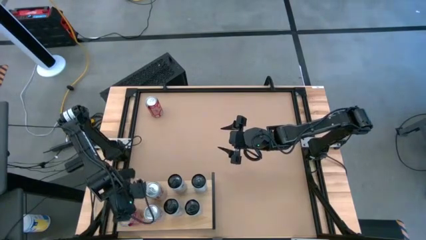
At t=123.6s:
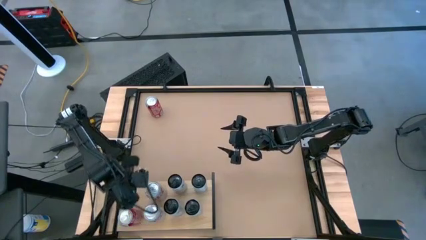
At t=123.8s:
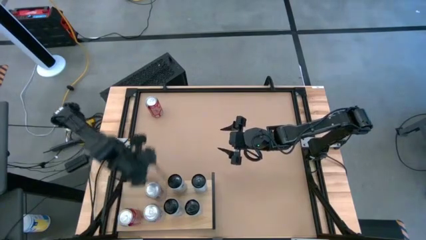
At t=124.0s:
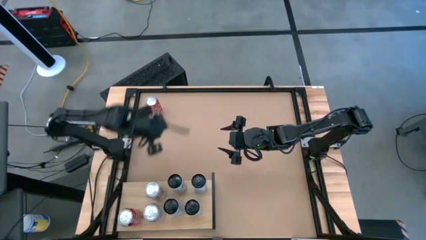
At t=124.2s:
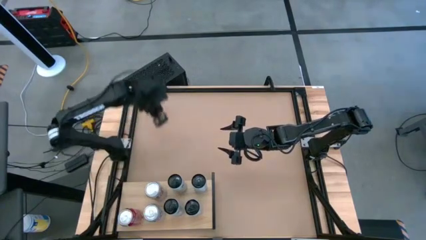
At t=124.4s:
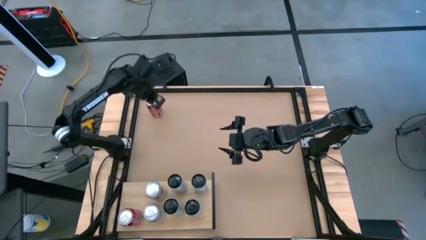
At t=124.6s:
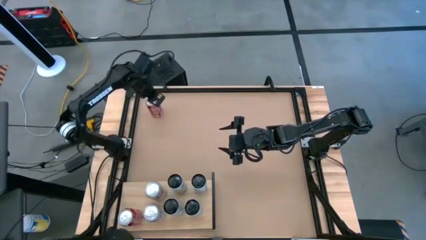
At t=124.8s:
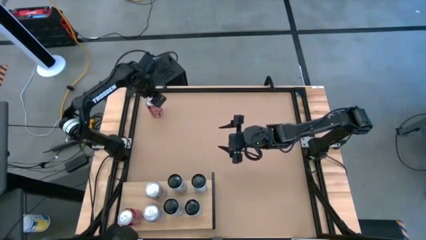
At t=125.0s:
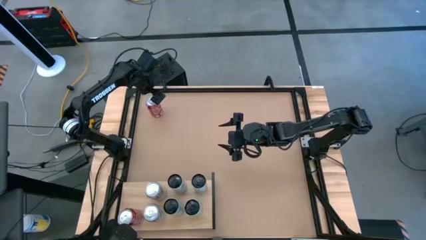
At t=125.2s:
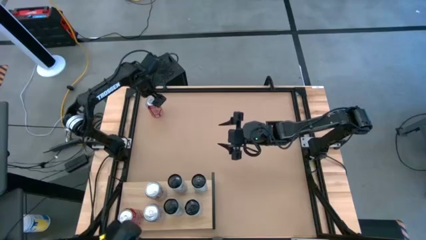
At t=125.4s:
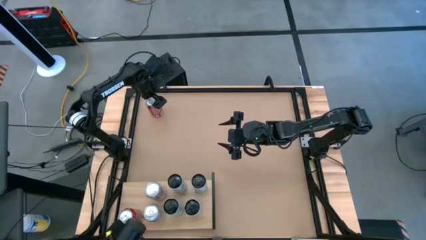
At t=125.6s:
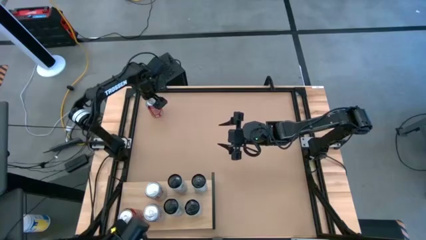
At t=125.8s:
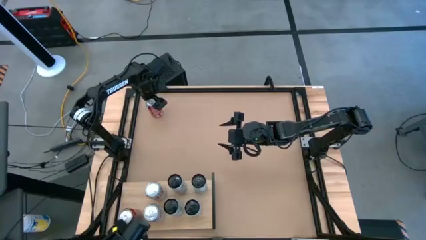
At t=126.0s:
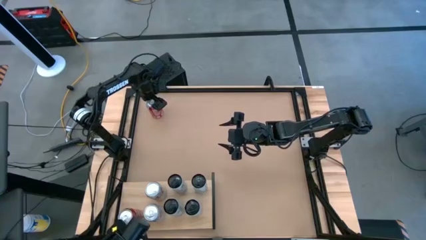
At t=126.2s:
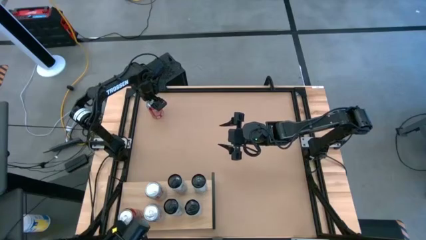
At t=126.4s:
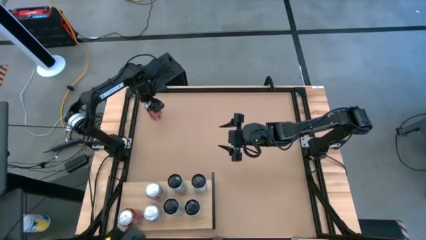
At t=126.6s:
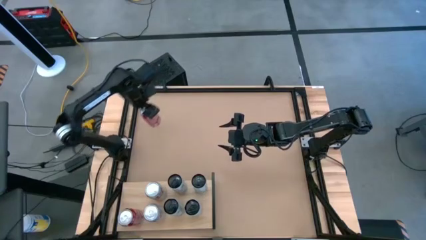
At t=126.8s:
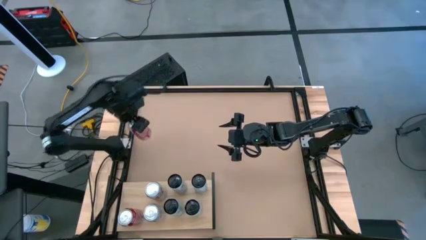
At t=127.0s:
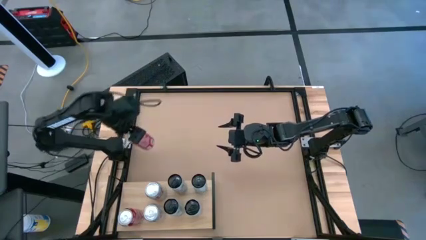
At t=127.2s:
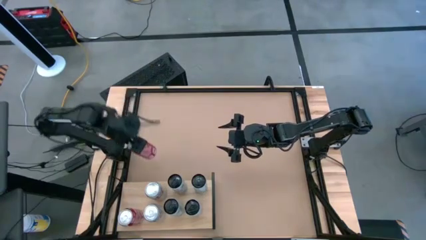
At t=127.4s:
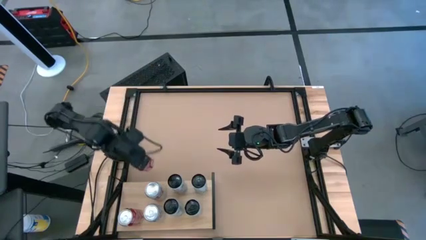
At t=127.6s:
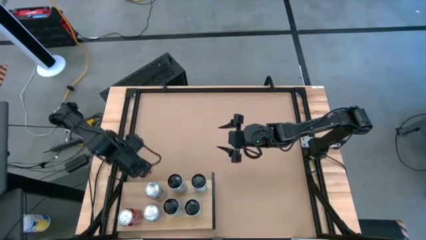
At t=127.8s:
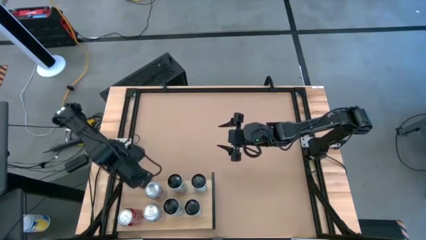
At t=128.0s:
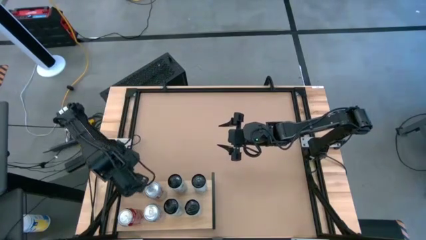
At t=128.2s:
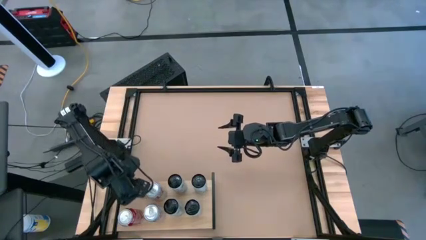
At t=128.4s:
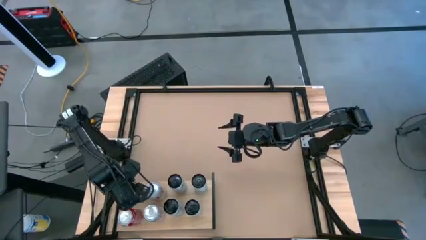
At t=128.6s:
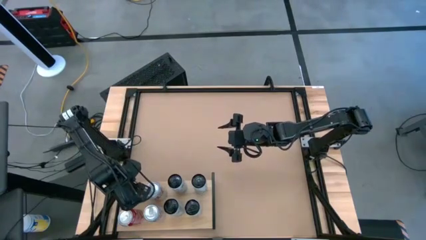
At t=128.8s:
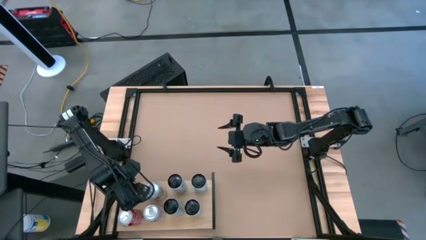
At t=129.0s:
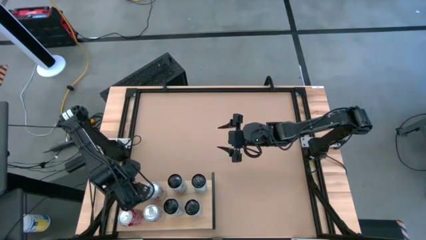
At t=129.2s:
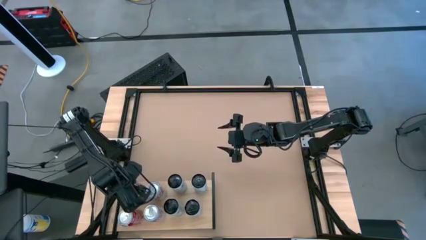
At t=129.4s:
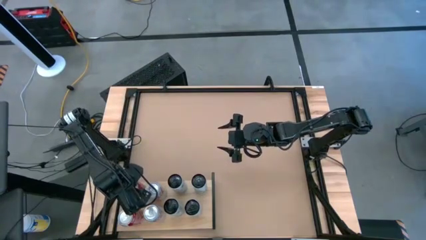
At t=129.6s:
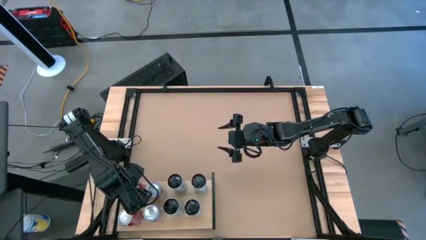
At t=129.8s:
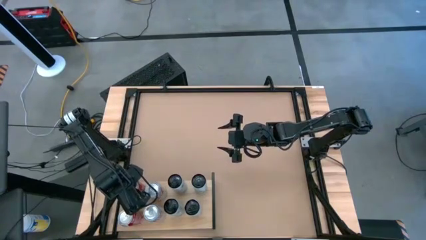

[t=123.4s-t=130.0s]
Task: Place canned beverage on shelf
Put the white can on the shelf aligned with the other red soda can

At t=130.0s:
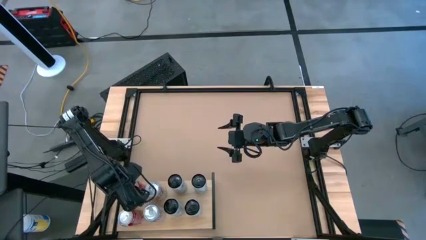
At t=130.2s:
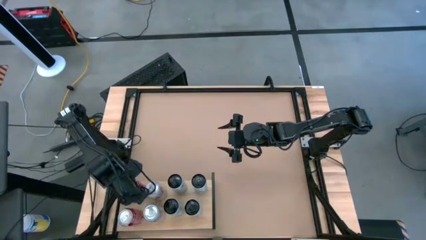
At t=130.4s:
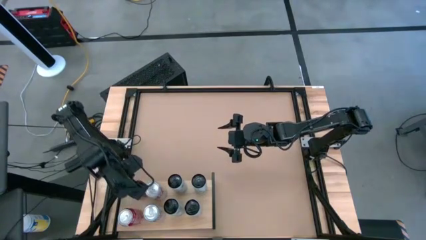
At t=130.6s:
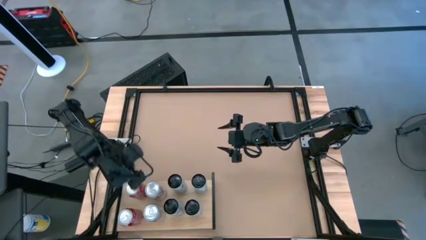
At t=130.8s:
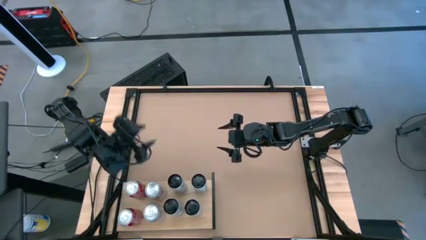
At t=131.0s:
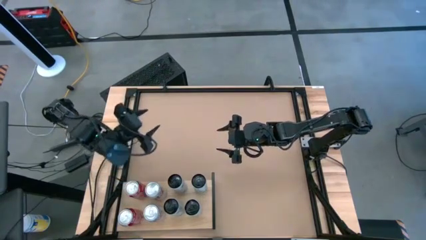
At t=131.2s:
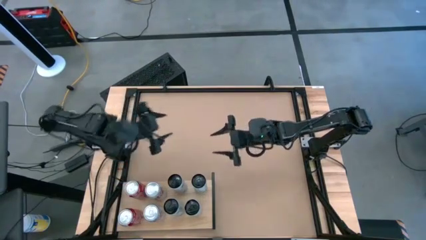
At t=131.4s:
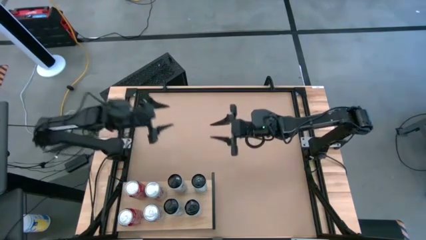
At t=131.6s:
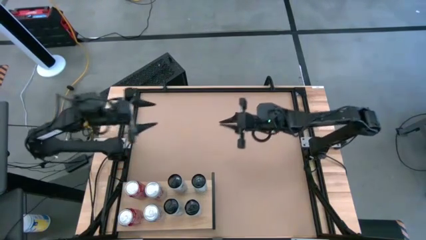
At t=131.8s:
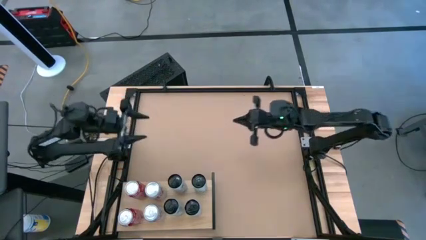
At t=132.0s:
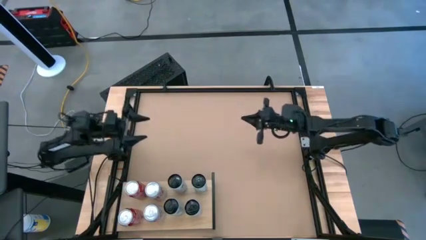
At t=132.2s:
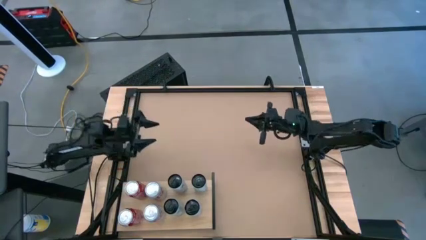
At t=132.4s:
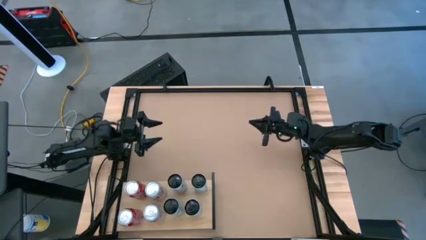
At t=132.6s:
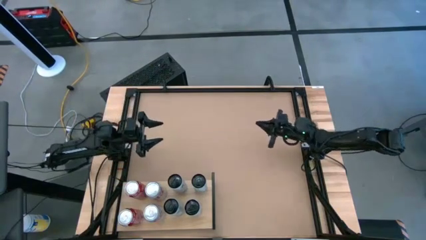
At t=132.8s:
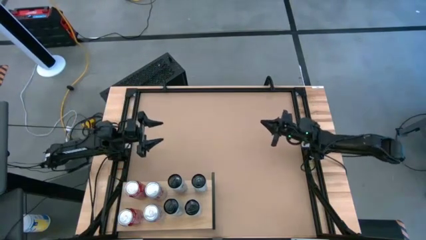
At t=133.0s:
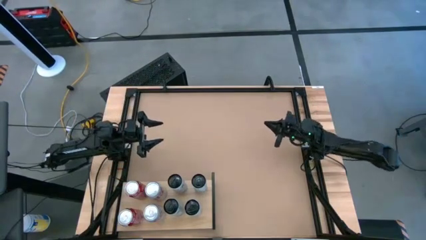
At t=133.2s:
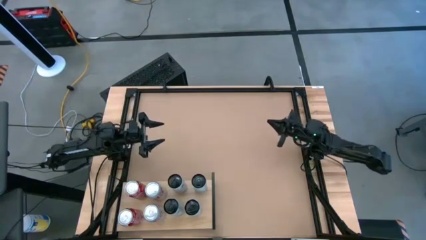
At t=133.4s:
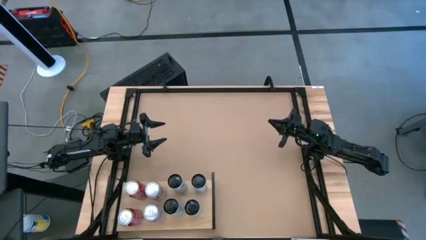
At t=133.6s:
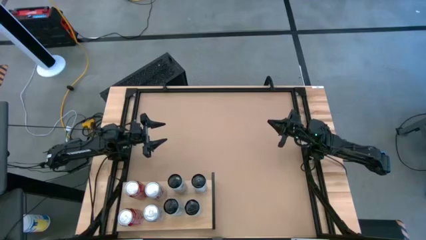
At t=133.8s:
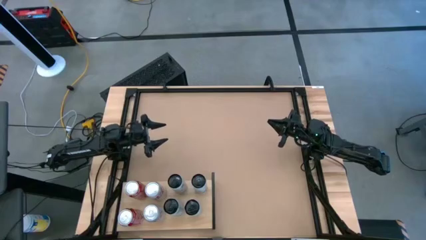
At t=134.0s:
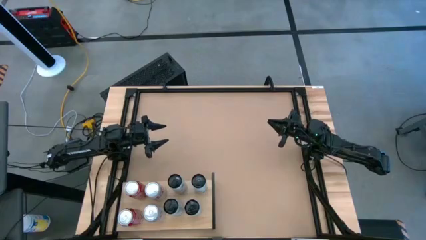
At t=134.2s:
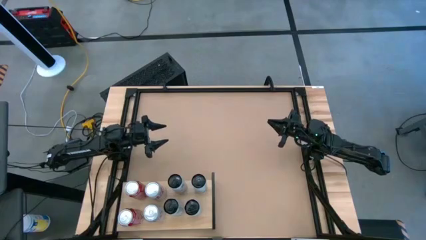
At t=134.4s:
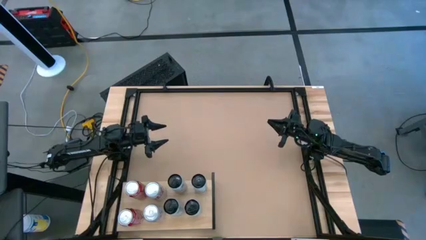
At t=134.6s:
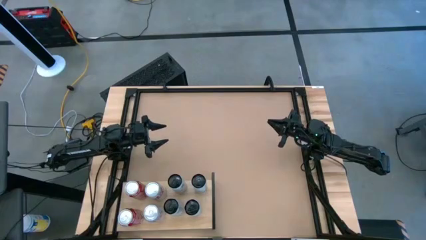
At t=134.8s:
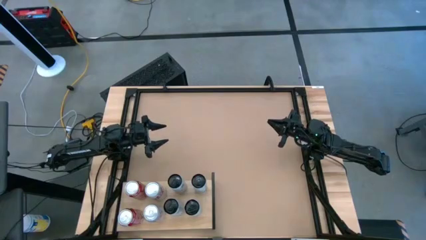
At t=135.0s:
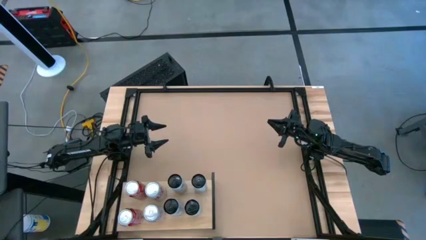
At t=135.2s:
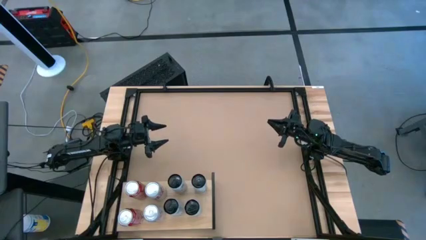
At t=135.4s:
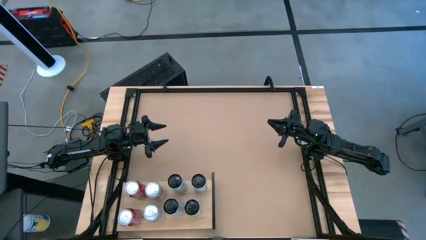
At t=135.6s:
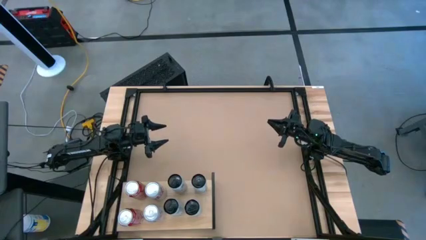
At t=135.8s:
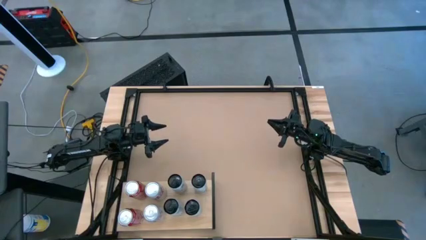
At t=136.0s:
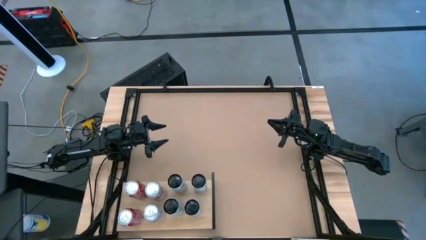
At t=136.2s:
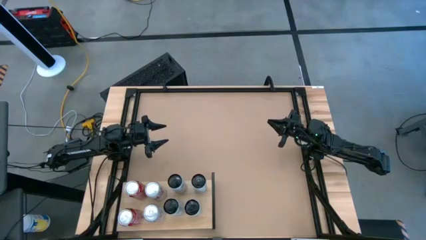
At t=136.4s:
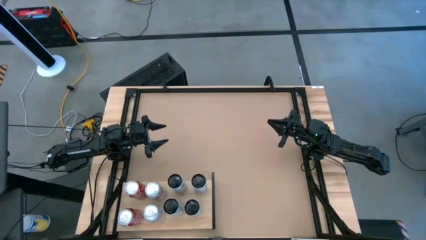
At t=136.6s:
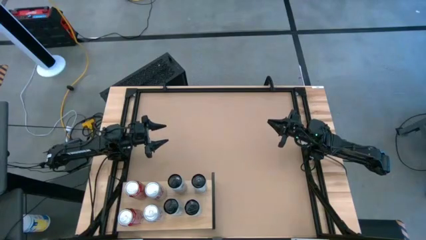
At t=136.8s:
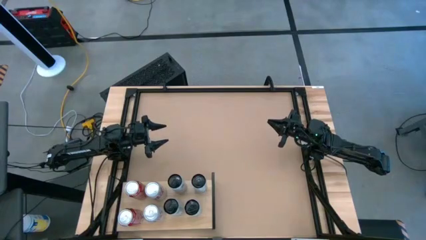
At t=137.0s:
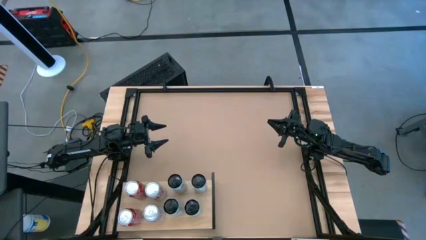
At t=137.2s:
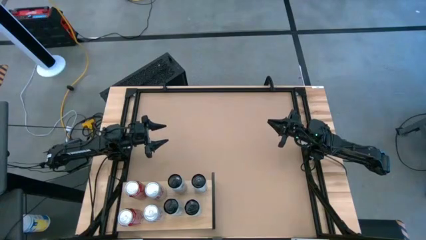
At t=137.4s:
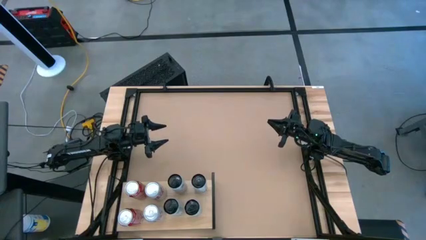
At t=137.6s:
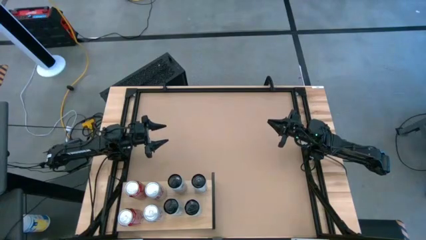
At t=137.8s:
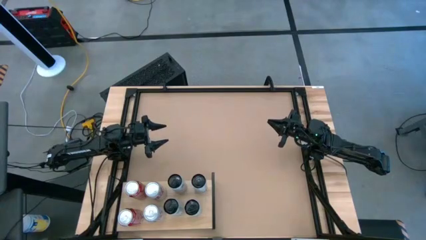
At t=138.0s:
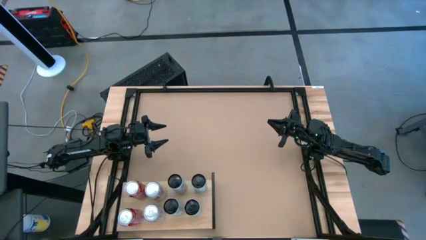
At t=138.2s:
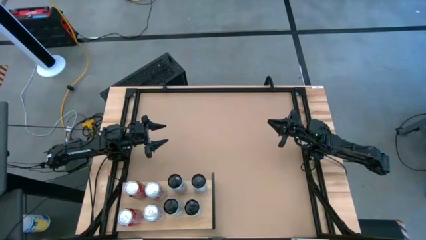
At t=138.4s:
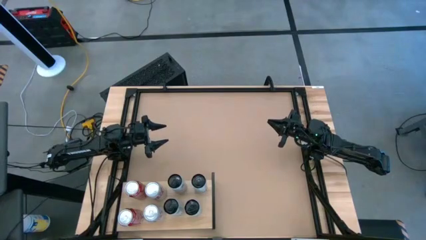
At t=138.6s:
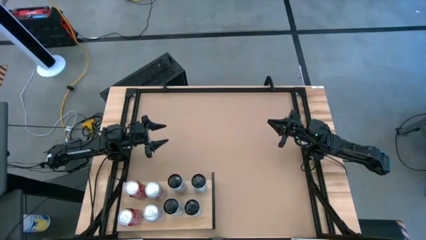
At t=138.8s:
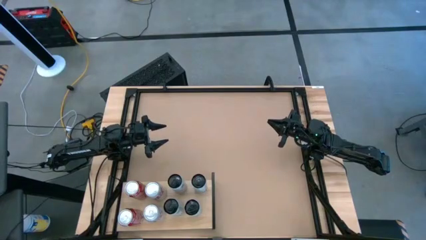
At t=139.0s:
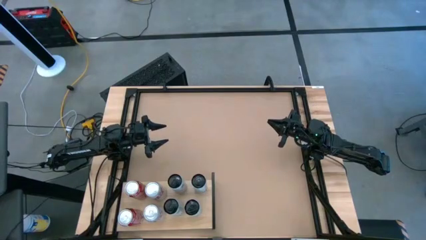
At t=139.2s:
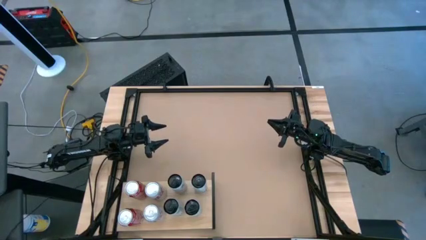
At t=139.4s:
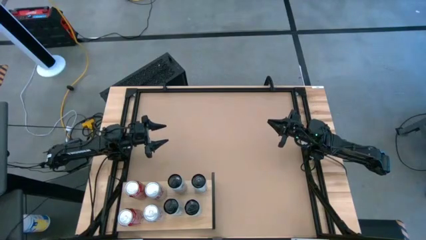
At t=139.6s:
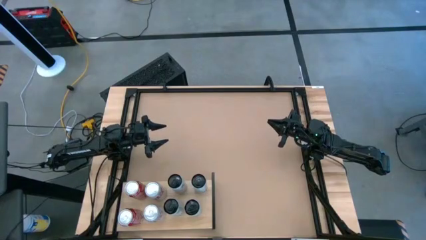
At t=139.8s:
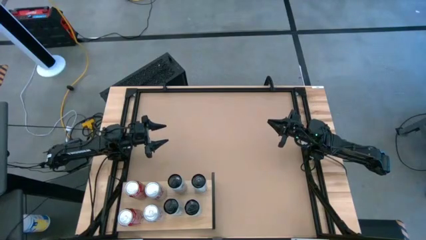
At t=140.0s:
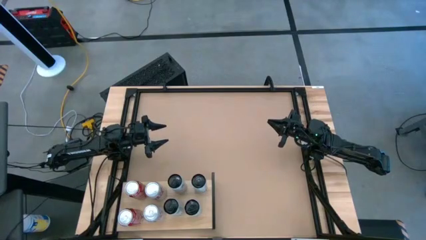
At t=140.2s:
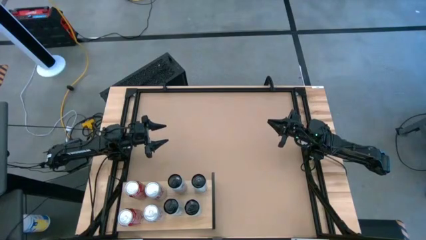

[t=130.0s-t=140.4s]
Return to Home Position
